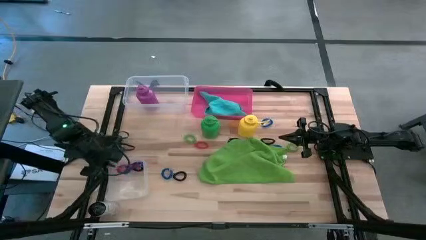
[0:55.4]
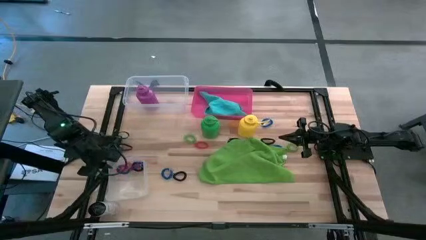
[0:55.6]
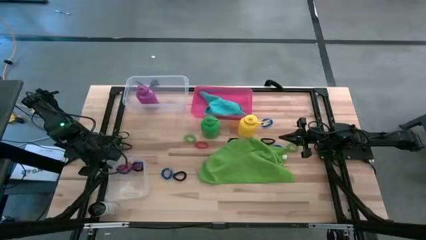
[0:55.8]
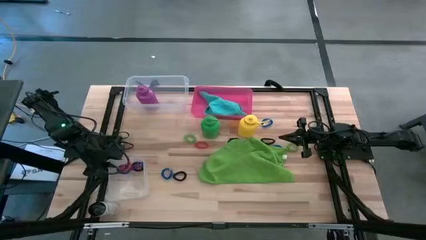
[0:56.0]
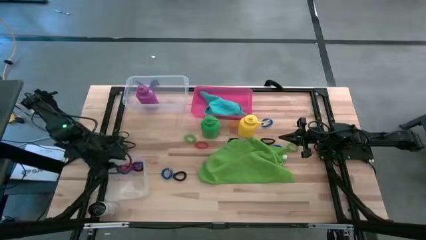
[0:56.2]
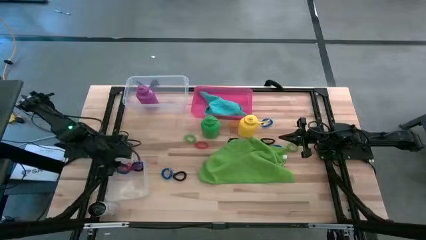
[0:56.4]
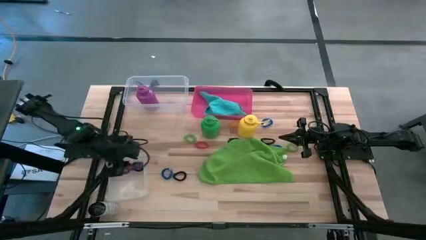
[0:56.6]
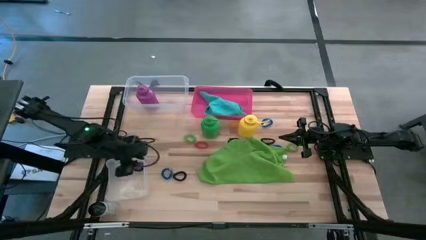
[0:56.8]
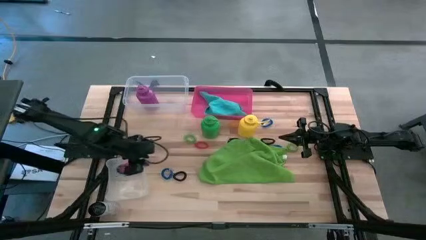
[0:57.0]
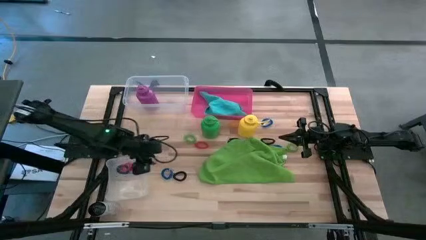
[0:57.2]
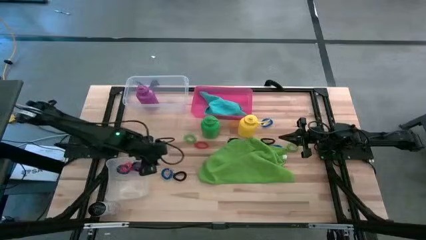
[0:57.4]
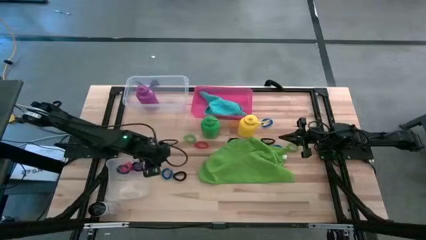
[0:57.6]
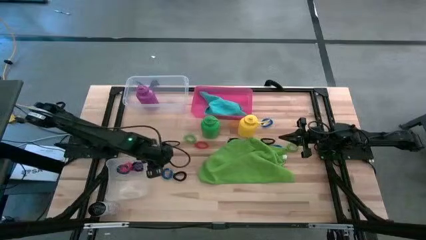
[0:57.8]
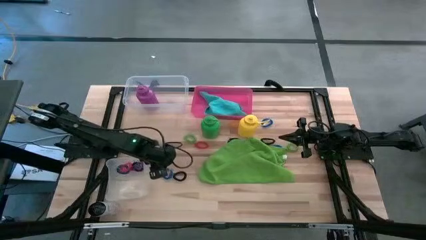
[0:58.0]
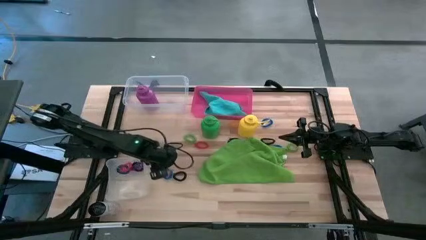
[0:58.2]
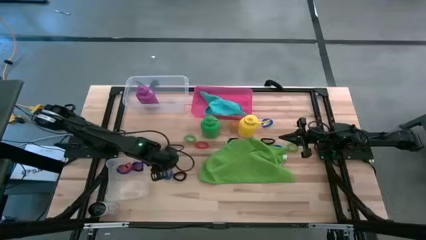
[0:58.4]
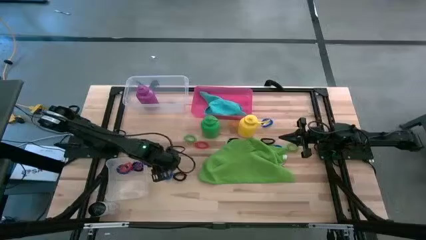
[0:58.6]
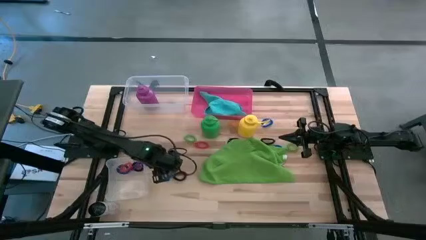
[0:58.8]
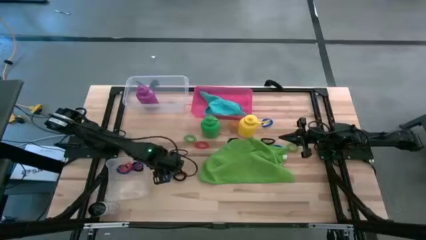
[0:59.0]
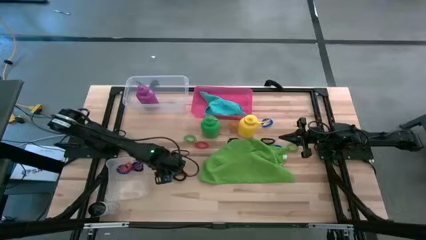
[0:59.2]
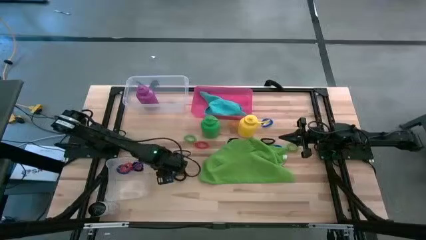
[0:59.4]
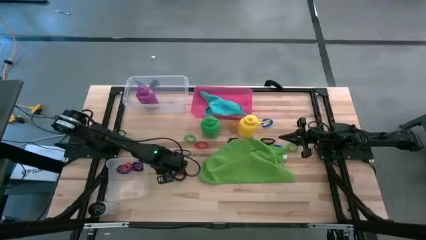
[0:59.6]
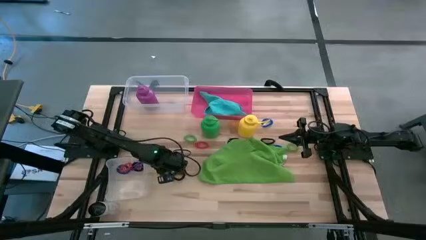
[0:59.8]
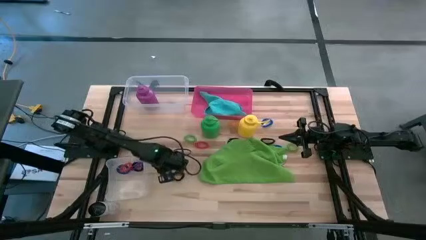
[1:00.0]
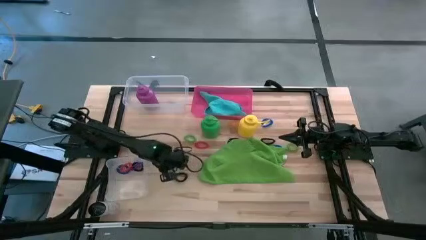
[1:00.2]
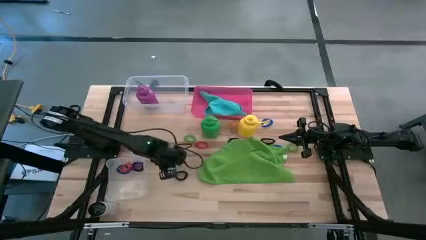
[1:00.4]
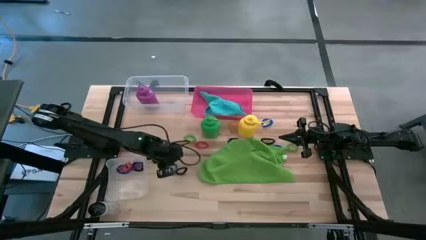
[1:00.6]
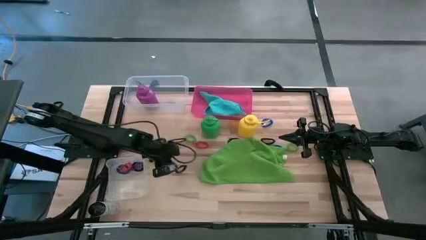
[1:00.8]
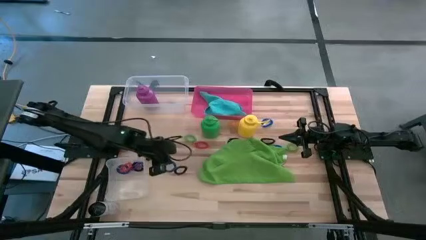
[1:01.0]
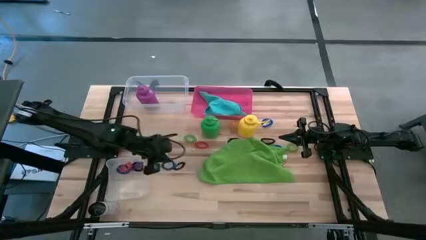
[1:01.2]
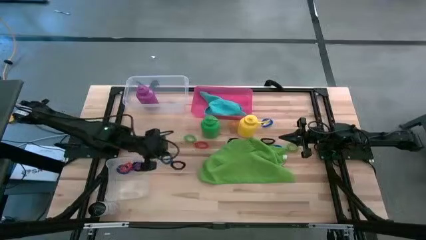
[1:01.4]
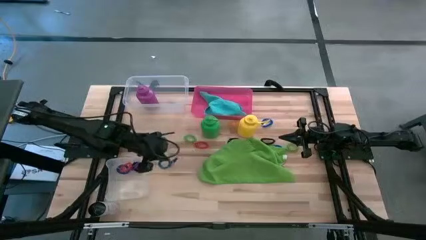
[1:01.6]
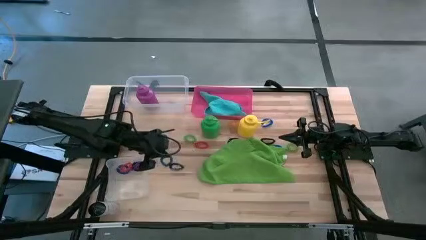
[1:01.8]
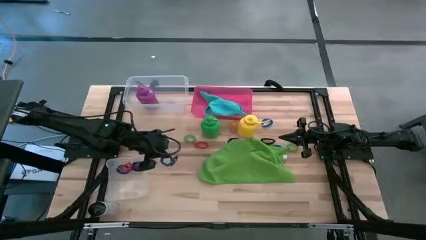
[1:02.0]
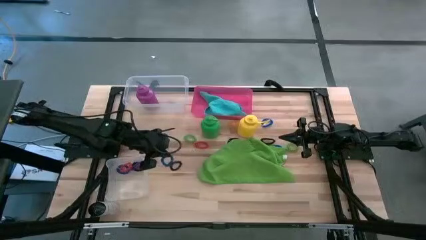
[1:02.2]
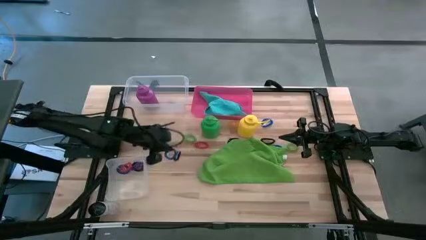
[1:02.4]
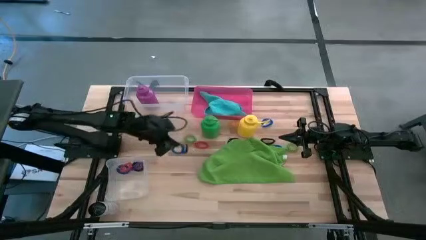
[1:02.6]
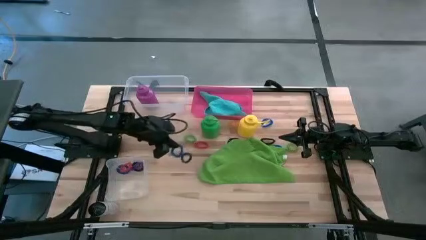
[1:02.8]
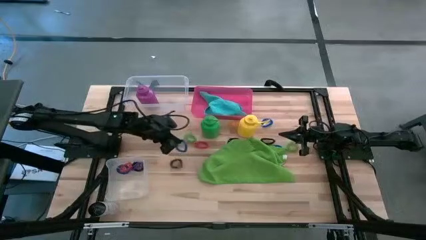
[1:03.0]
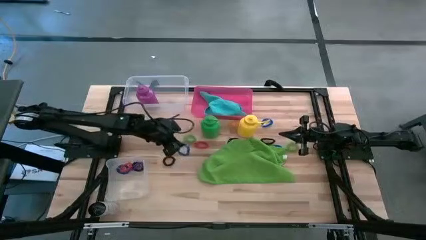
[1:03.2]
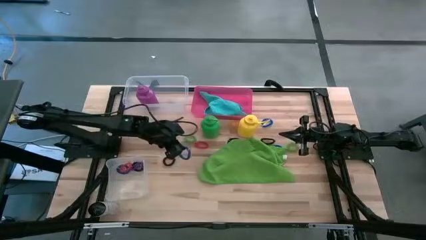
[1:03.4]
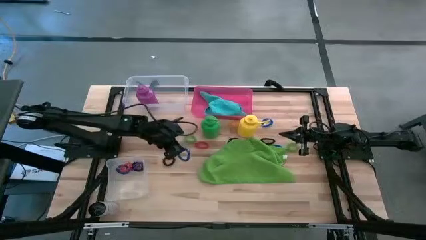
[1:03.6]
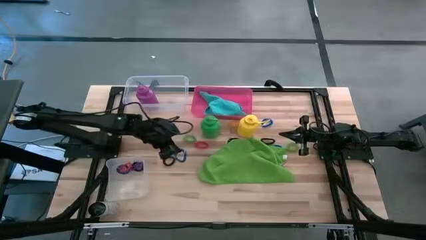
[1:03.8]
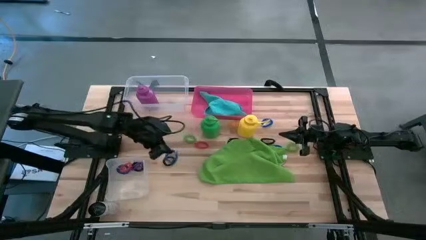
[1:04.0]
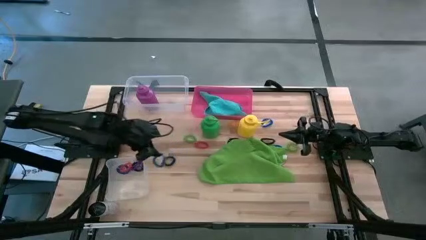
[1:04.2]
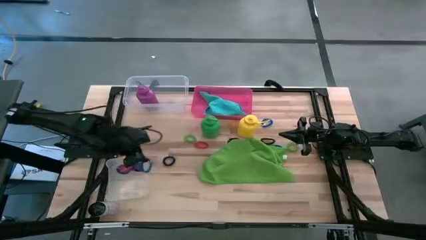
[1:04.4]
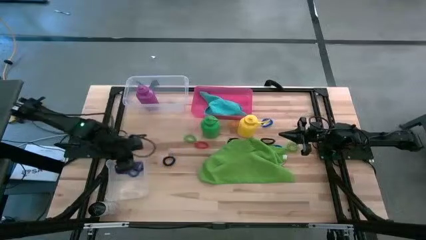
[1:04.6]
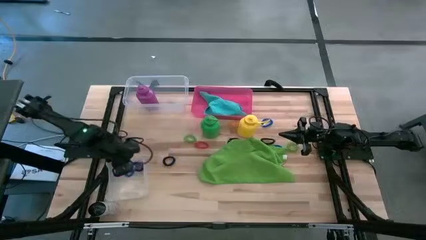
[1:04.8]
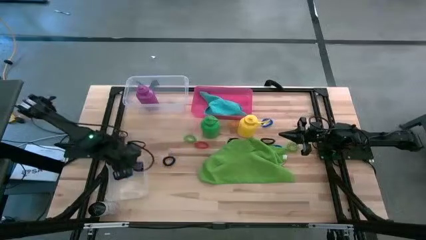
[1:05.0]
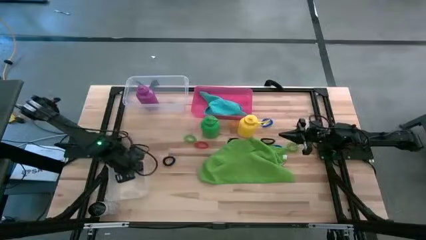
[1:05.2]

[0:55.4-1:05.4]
Task: Pick & Place Sports Items
Put the blue spring keychain into the bottom transparent bin

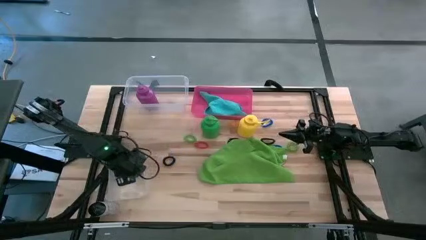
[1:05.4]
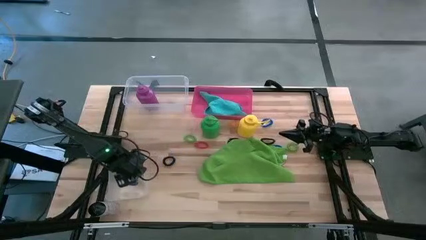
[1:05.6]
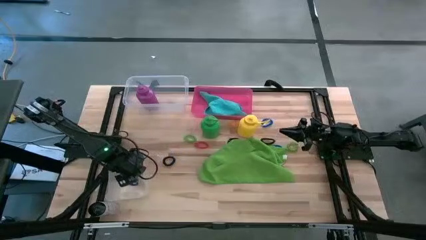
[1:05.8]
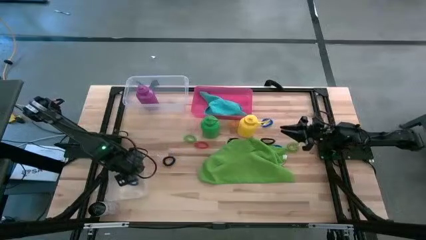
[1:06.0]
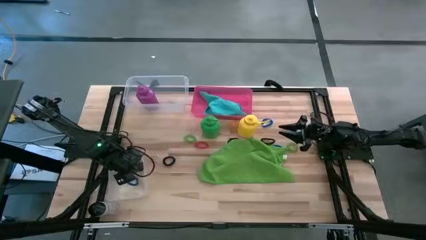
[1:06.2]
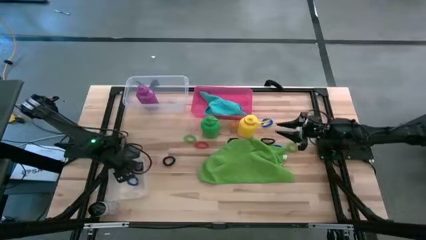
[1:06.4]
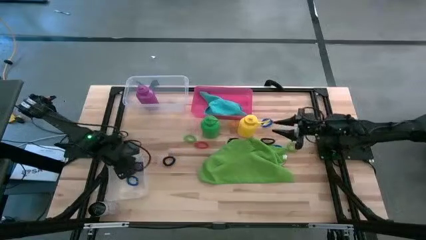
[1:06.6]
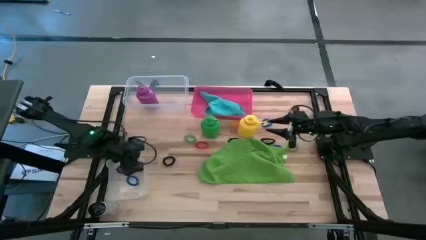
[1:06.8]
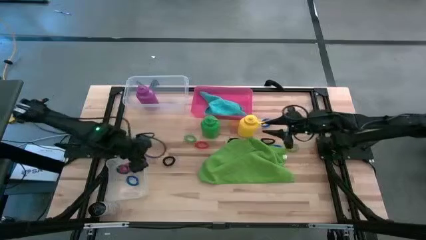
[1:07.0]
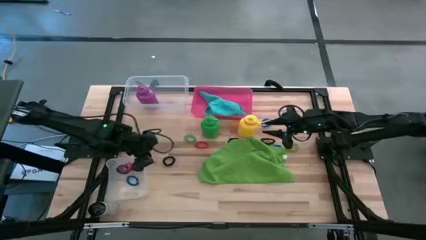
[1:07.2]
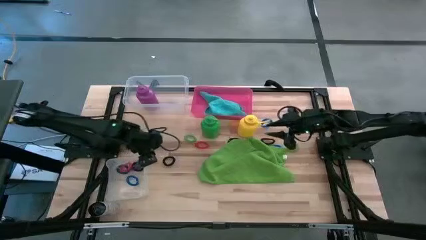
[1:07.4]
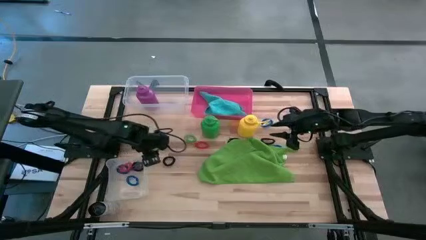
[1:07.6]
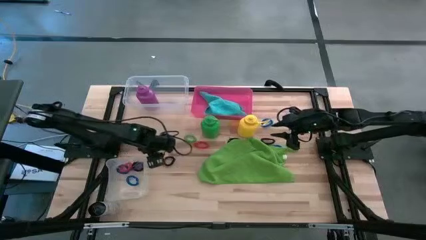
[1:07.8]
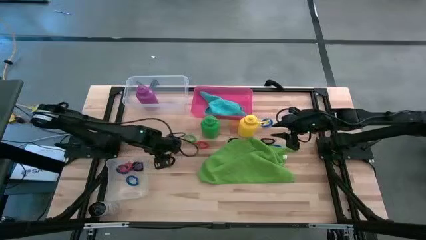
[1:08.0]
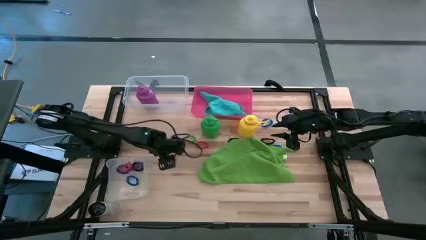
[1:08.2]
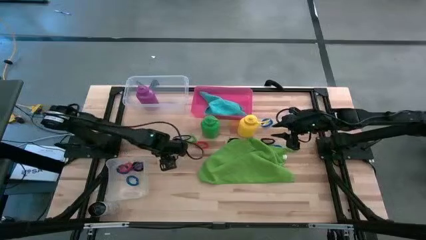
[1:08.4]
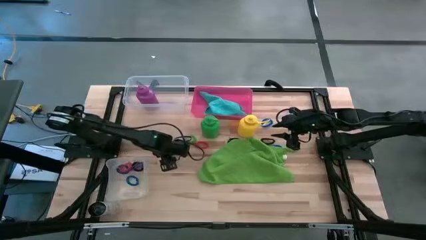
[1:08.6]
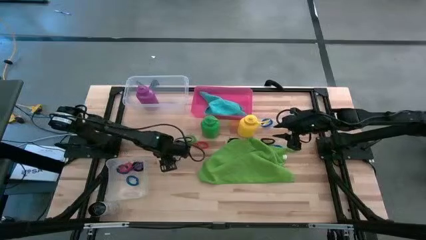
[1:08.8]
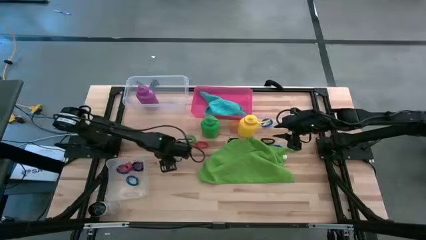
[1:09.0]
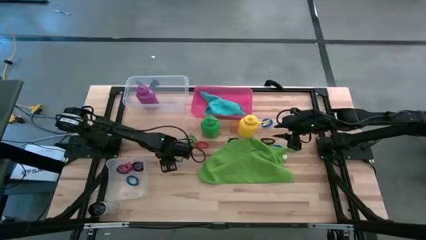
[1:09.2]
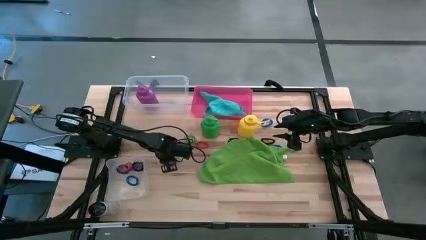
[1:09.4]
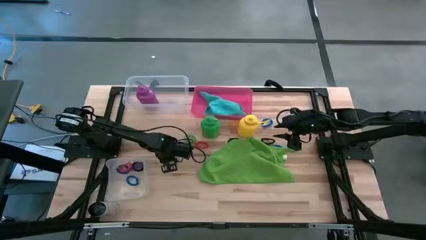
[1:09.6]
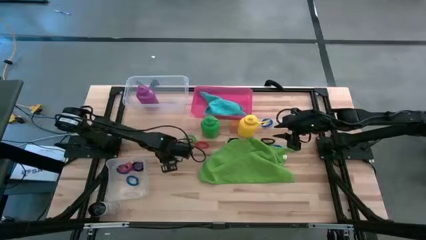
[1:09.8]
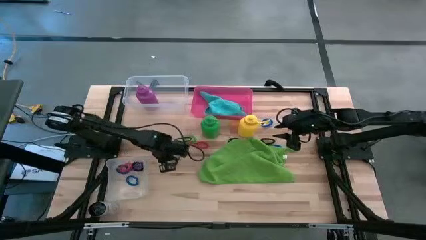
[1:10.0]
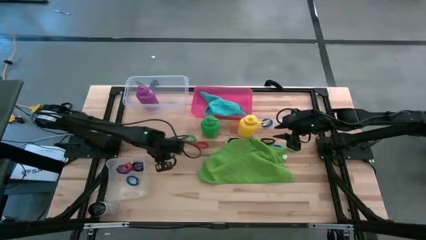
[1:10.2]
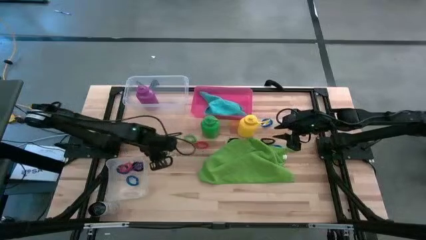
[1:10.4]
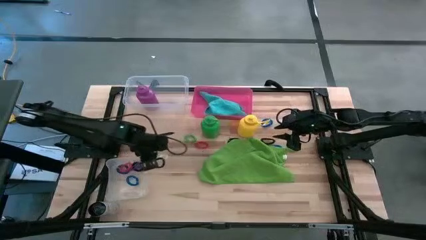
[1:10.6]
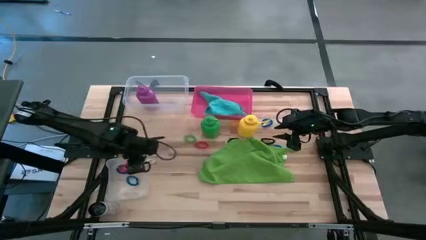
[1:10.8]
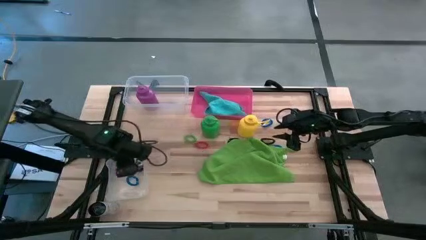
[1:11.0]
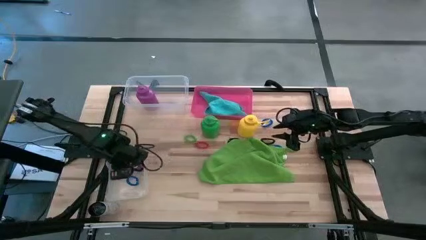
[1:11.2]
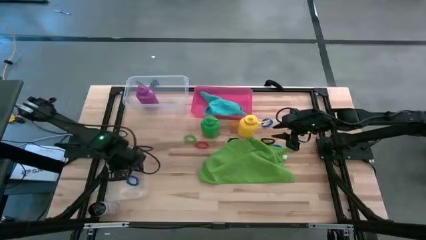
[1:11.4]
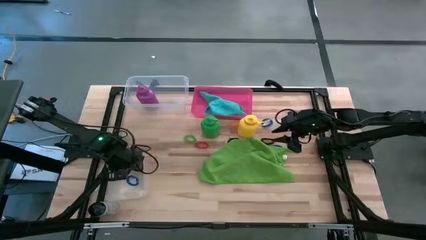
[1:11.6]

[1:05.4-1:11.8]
Put the black spring keychain into the bottom transparent bin
